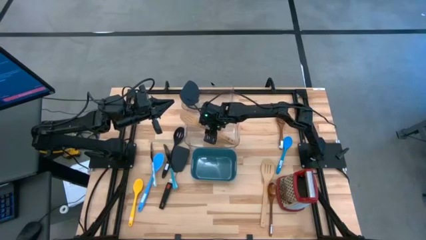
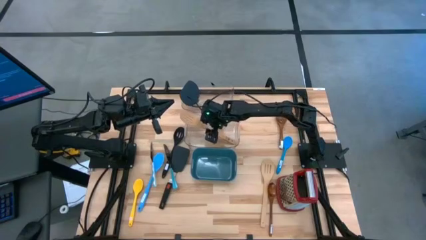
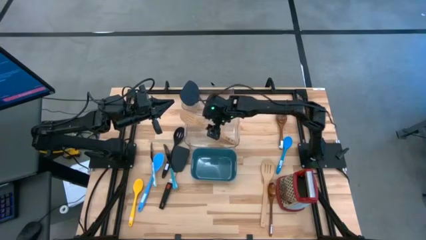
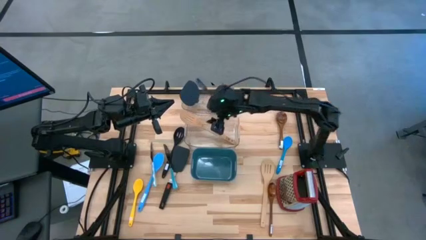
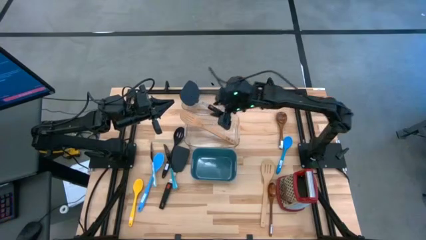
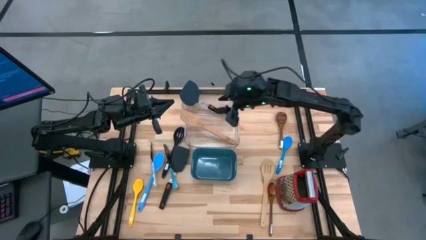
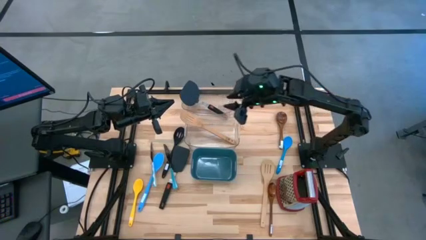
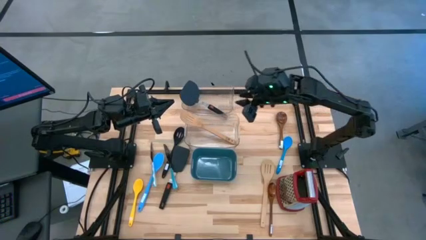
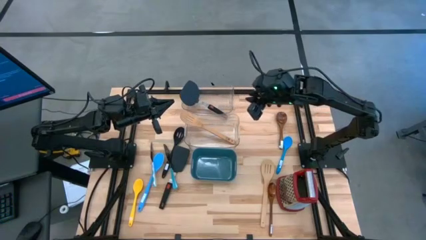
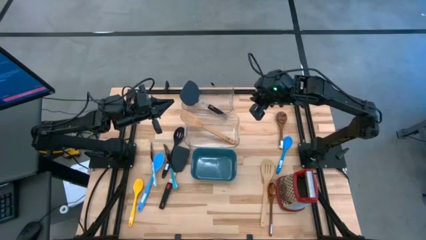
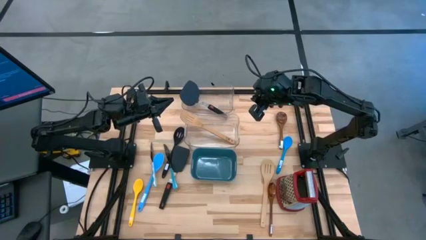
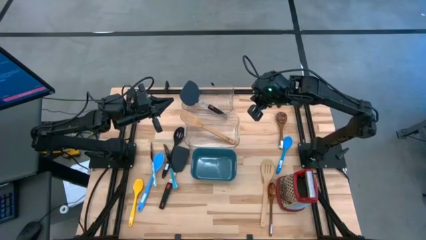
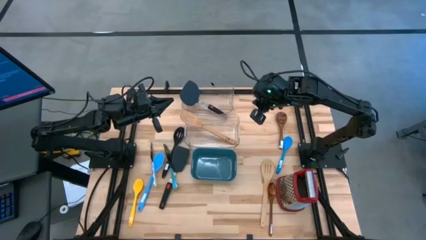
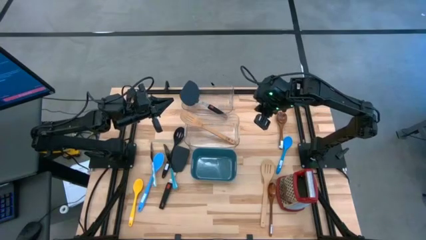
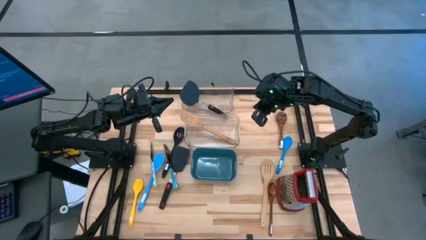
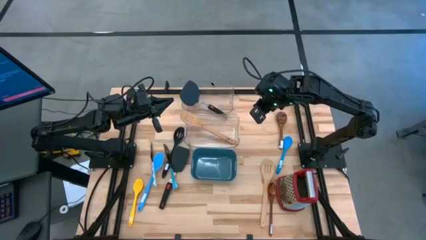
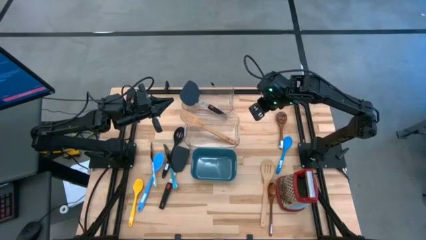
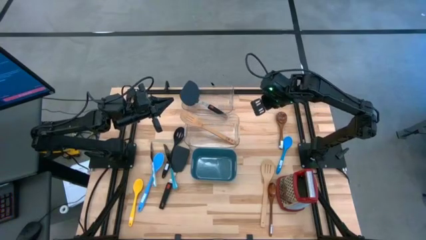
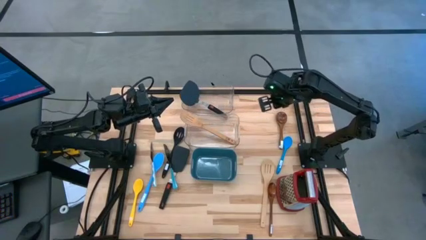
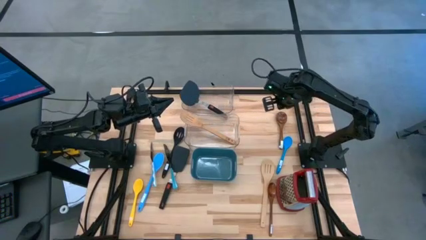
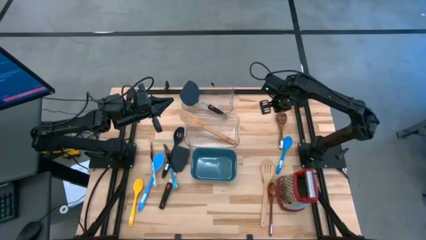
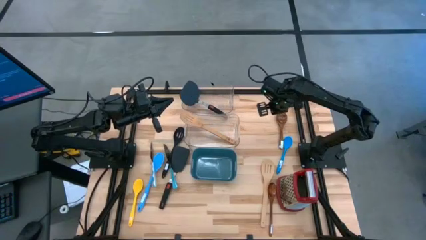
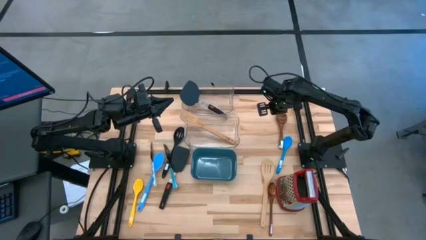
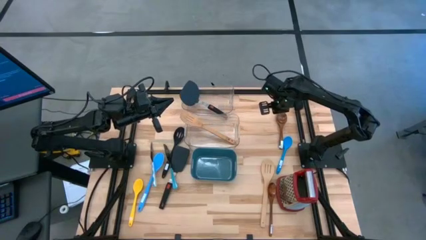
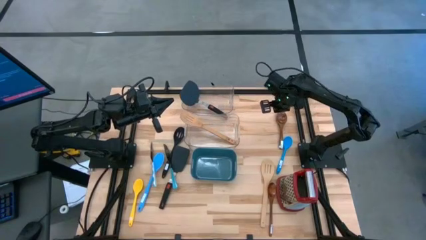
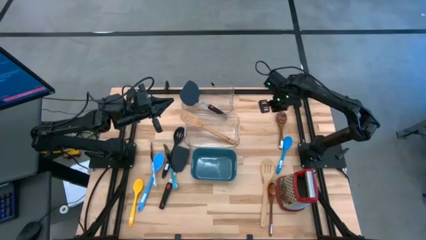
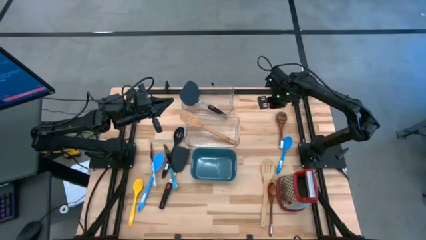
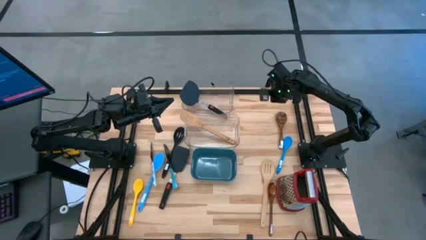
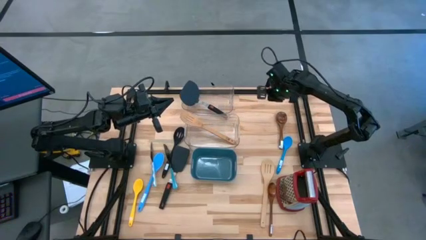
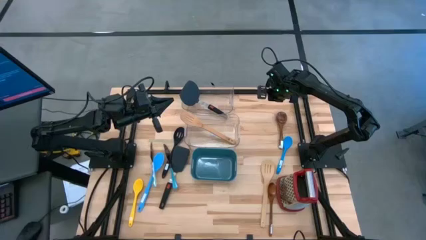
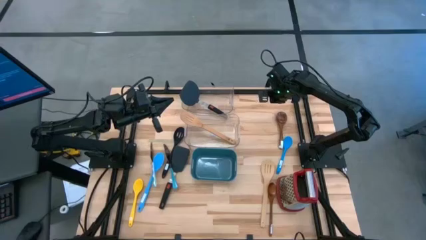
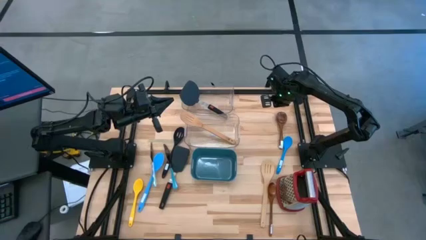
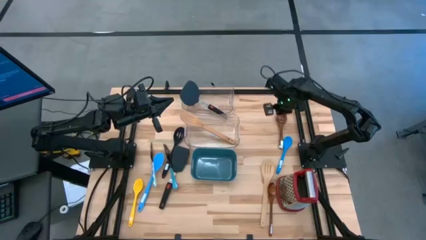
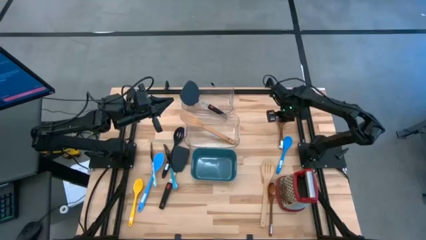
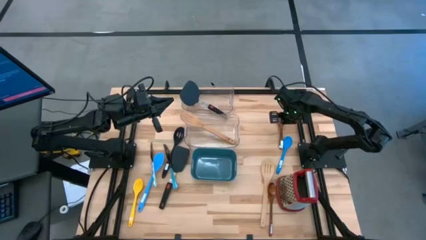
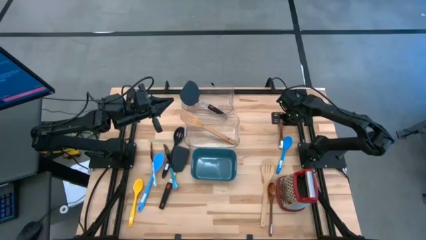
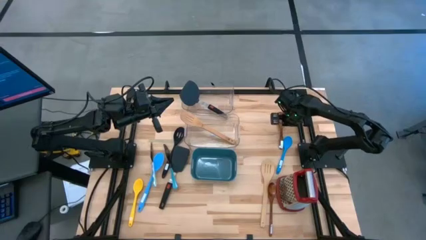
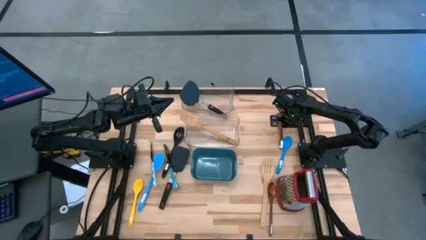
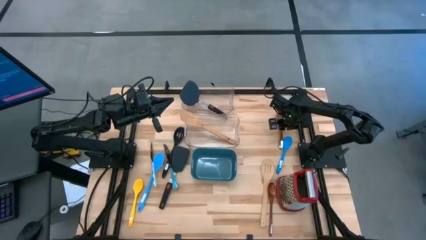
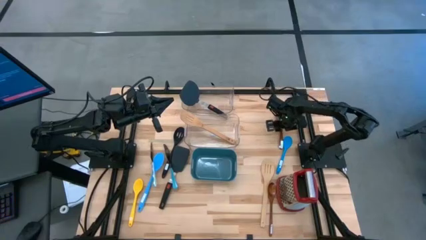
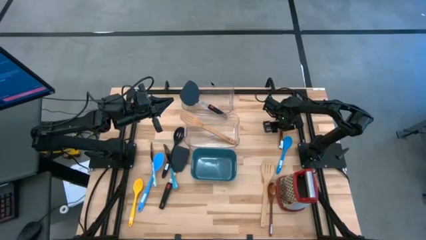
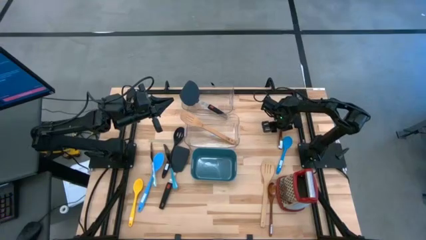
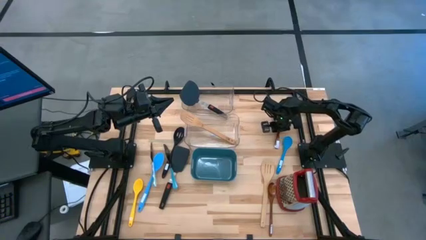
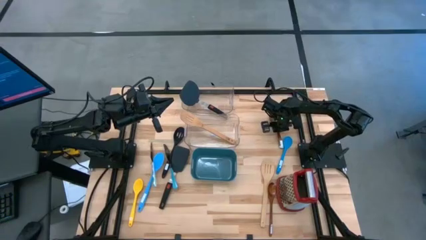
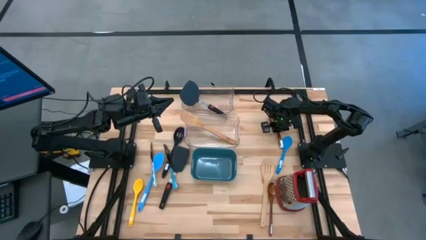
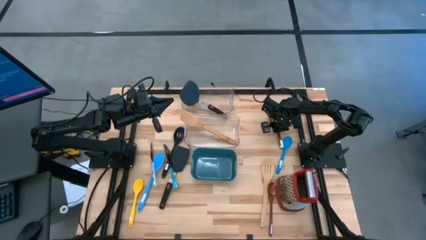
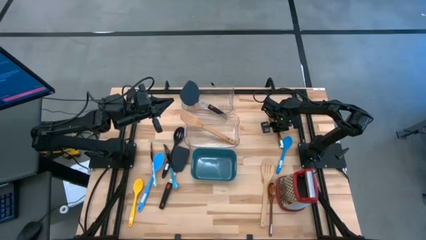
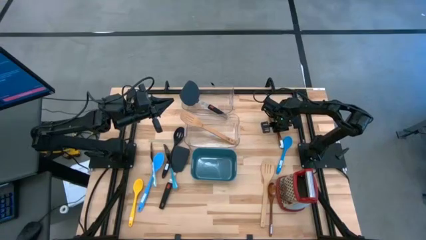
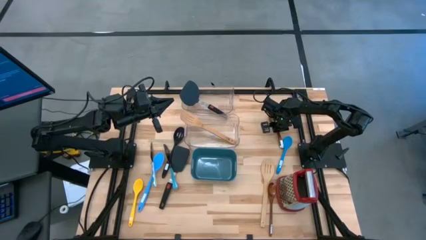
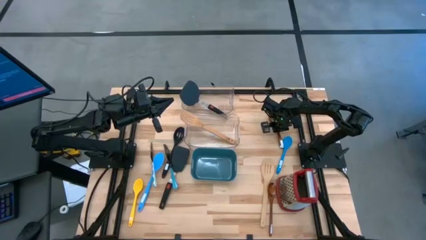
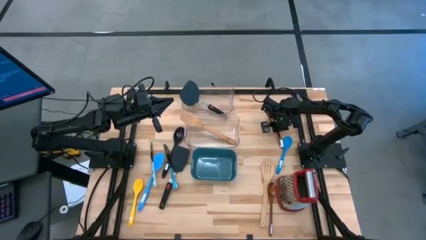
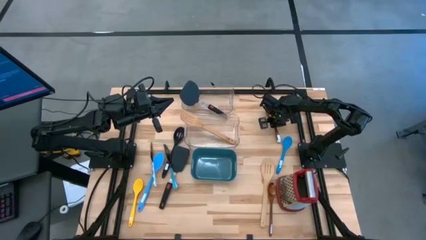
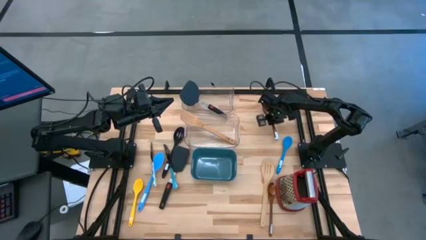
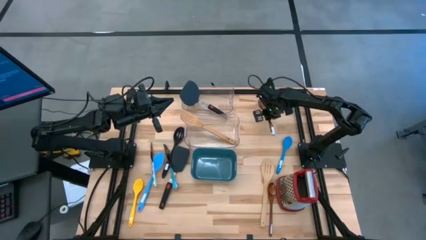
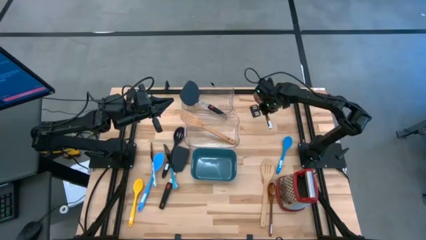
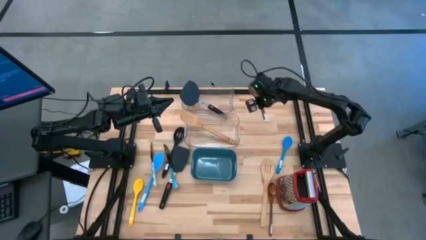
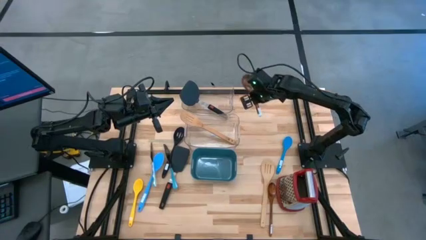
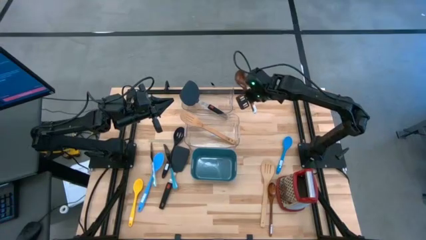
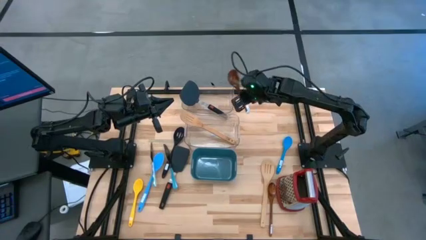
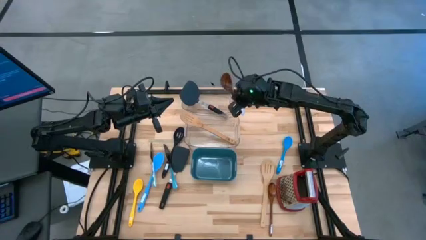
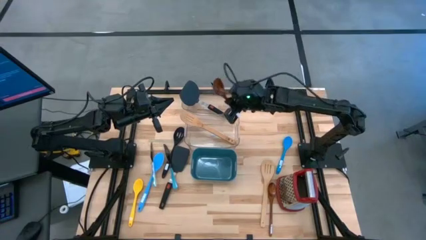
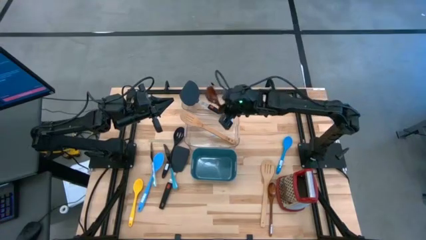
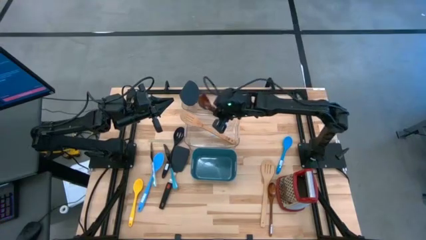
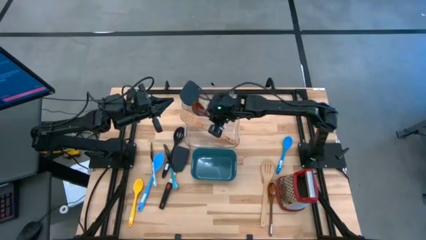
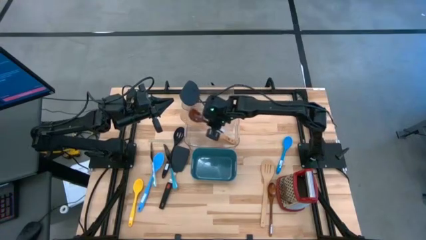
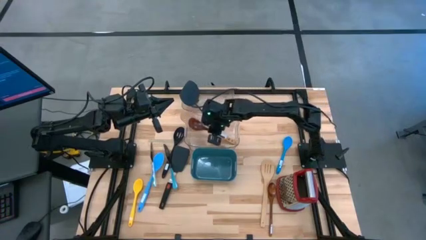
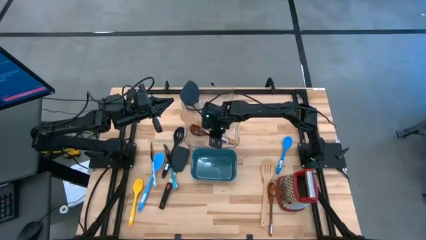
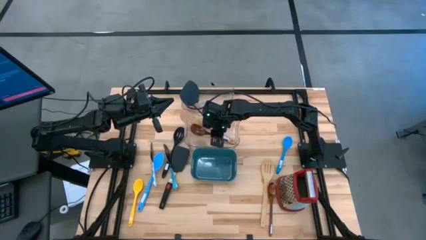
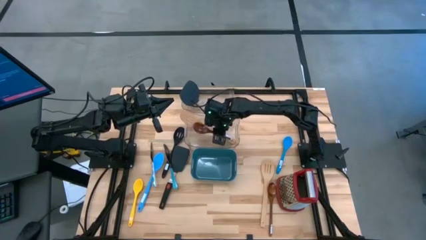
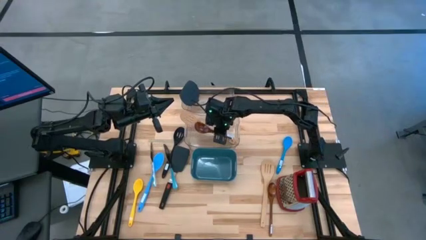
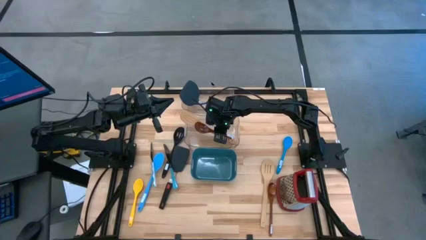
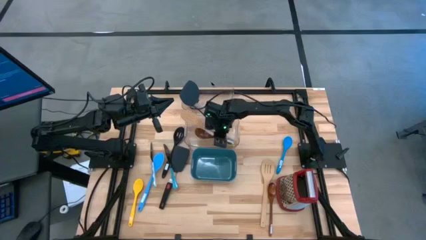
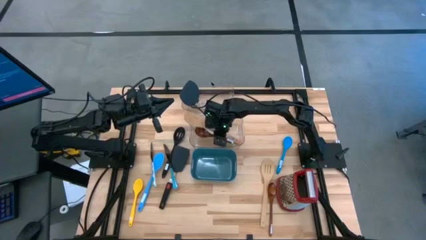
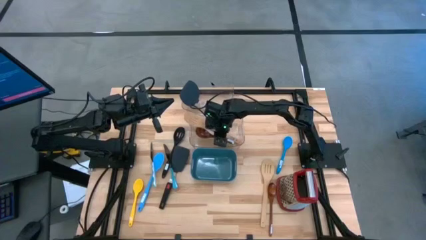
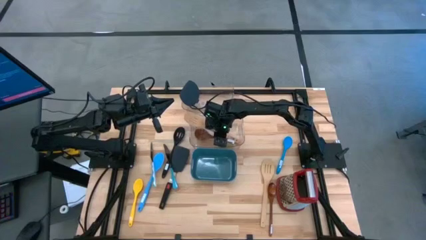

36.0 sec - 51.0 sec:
Task: Pick & Place Kitchen Items
Put the top wooden serving spoon into the bottom transparent bin
